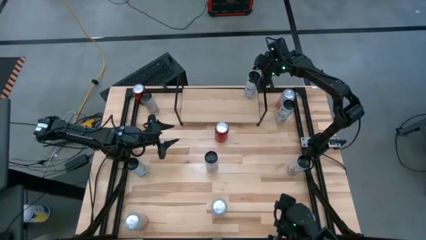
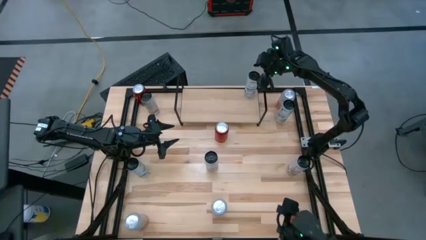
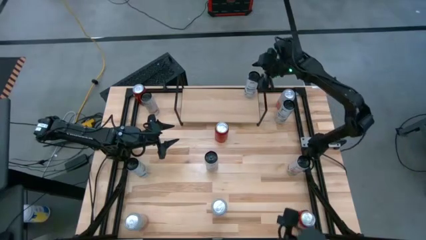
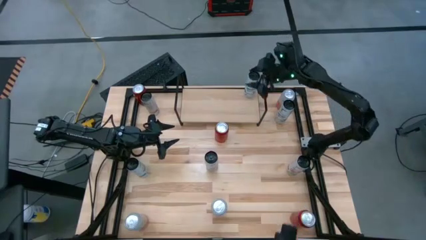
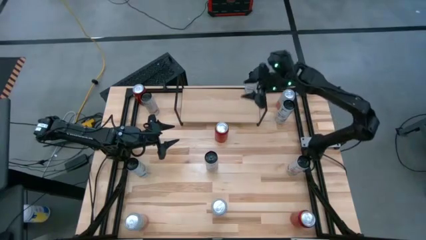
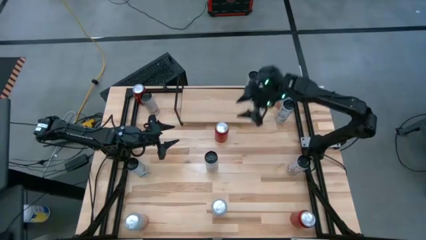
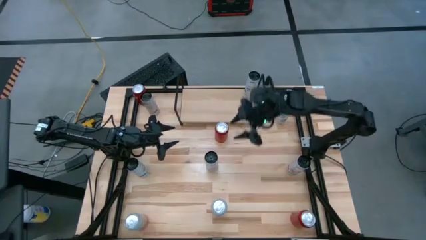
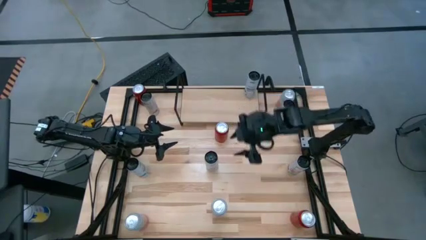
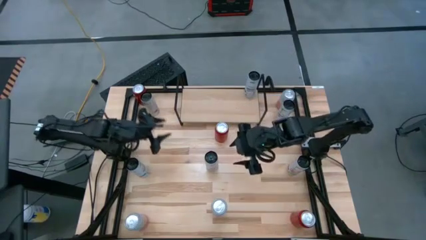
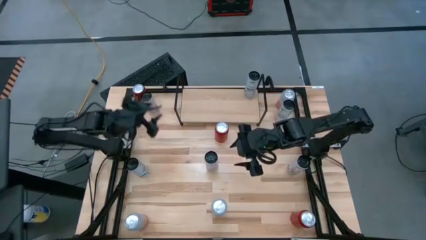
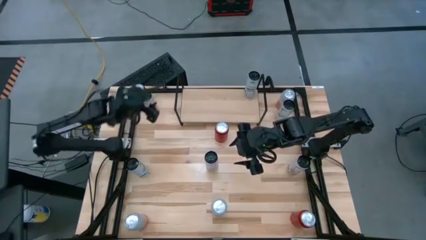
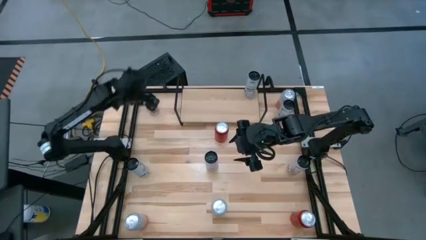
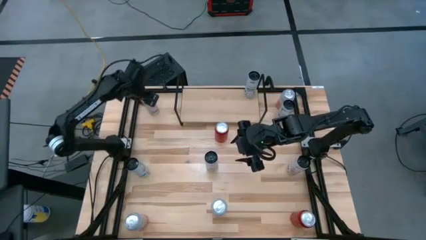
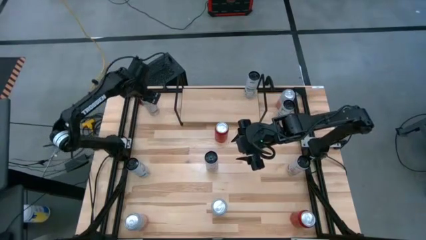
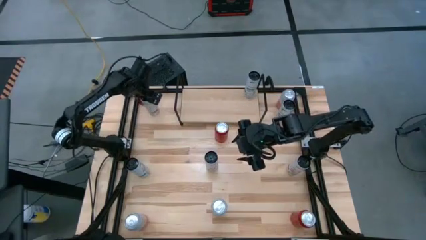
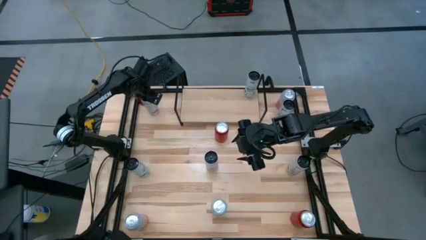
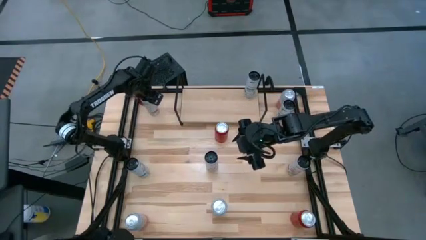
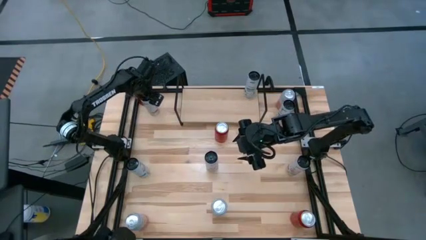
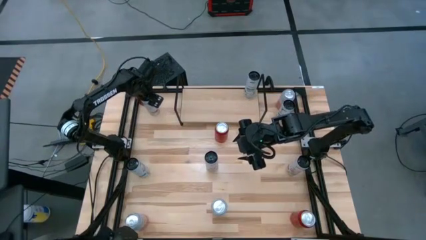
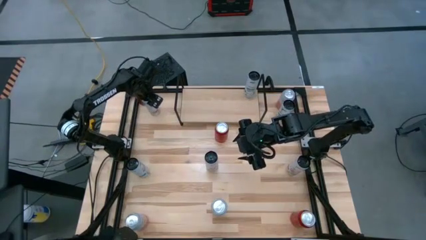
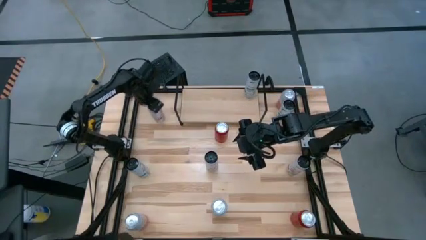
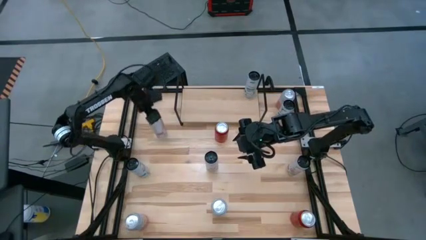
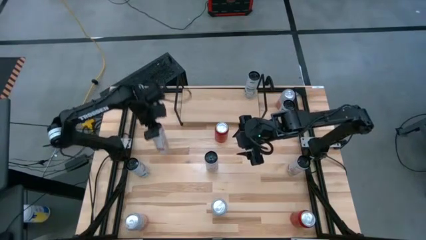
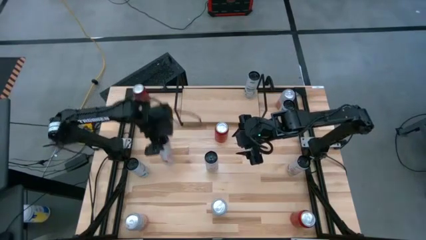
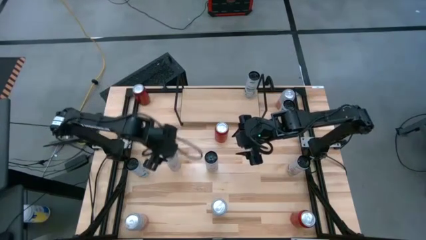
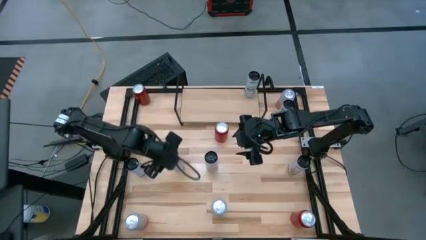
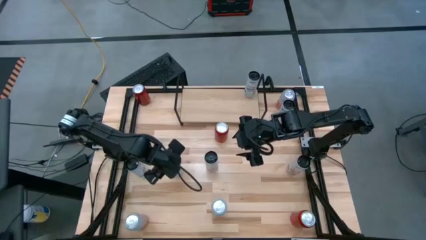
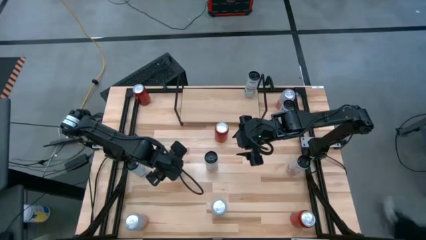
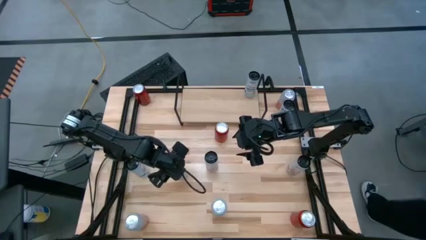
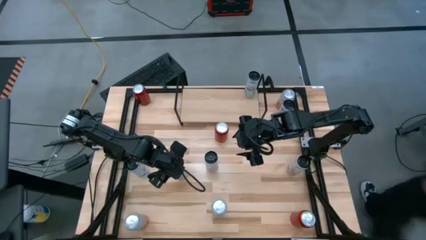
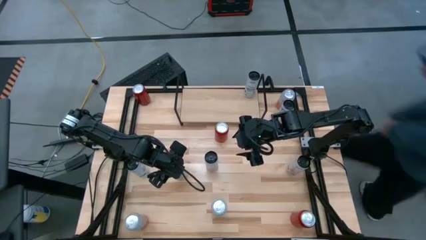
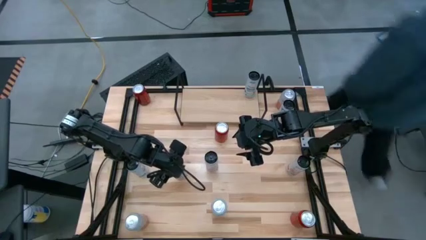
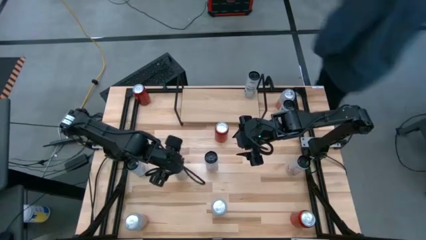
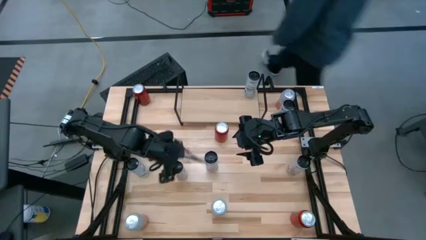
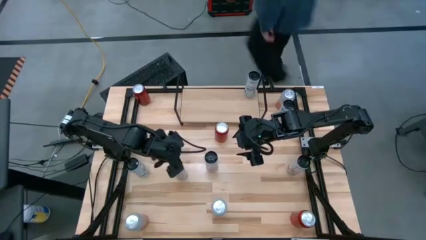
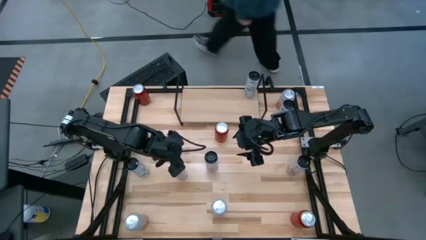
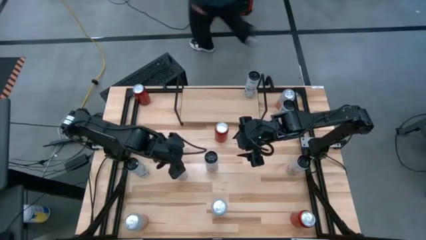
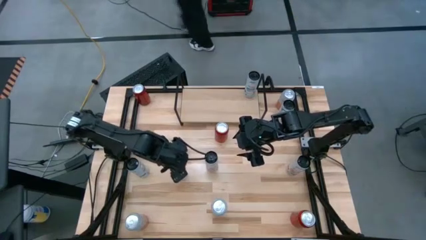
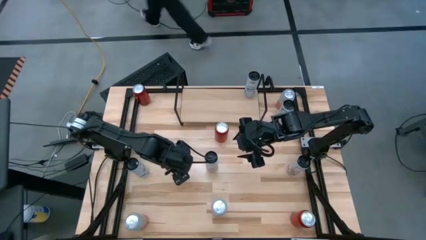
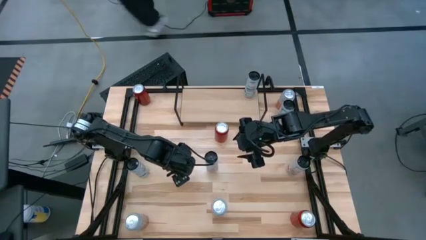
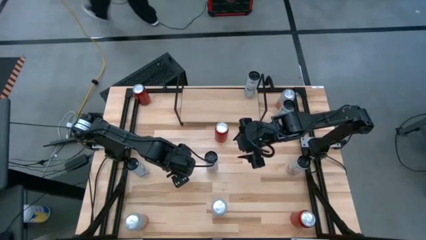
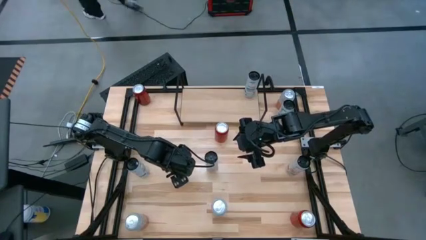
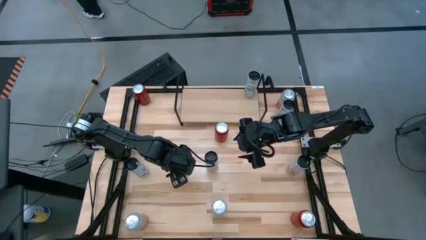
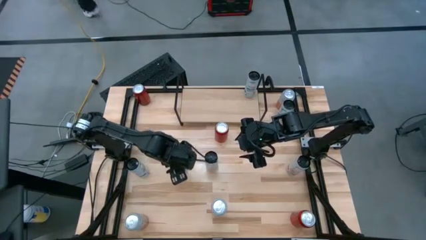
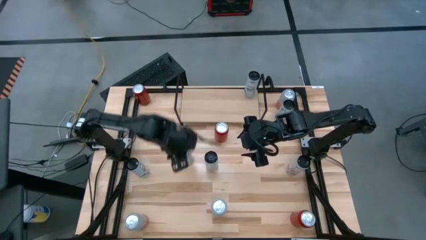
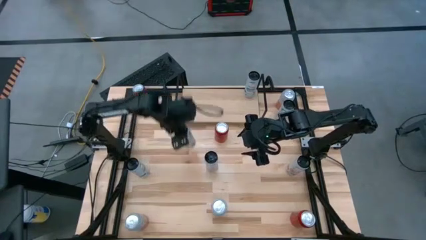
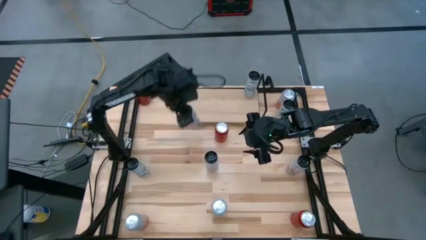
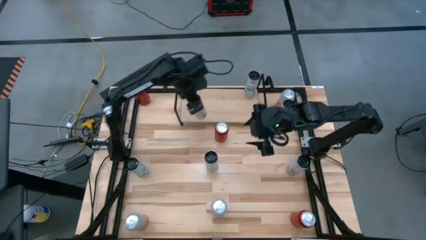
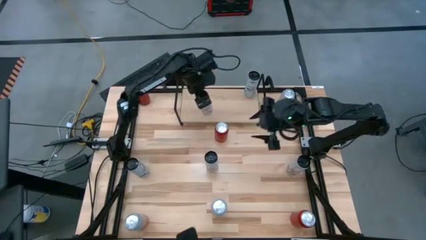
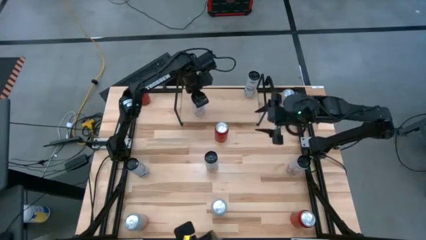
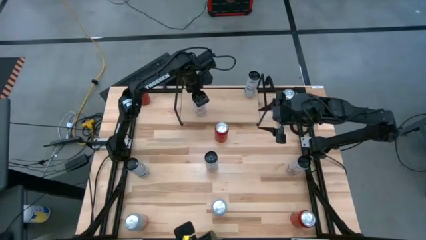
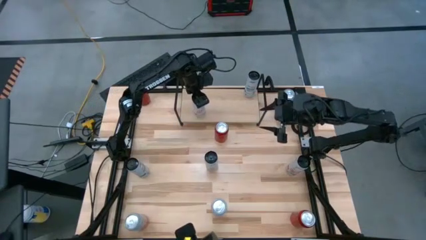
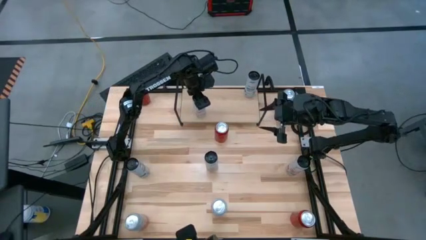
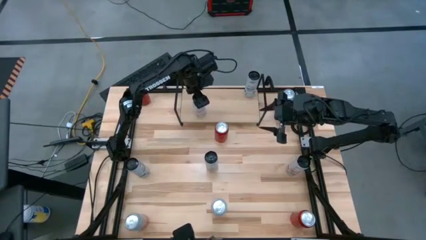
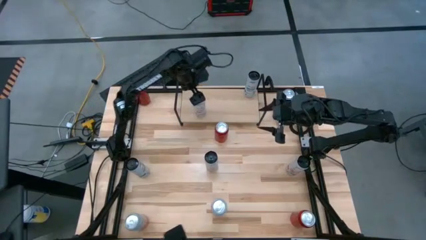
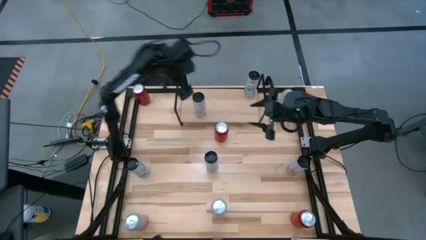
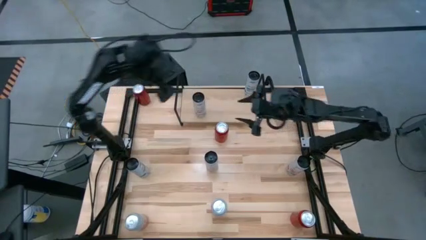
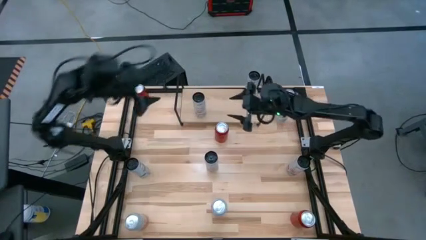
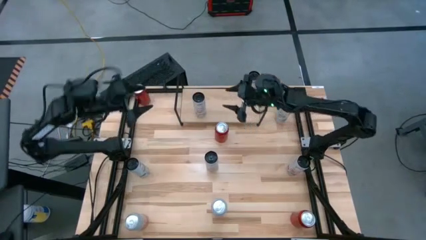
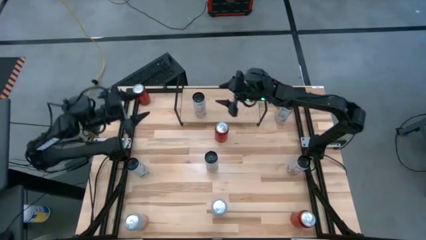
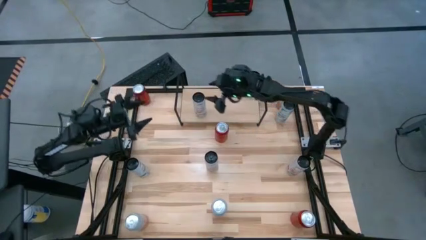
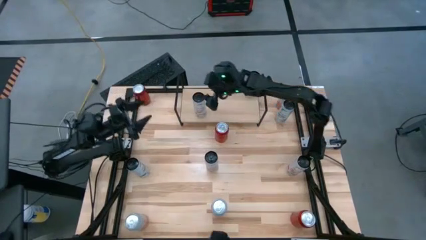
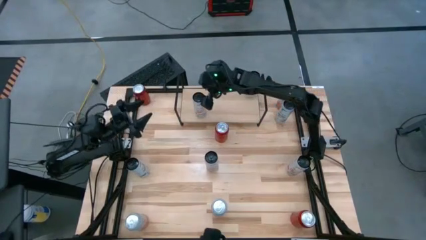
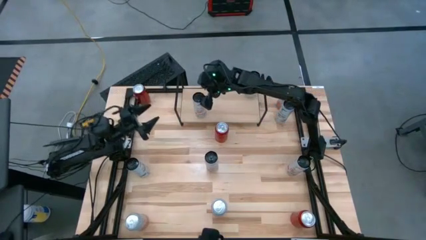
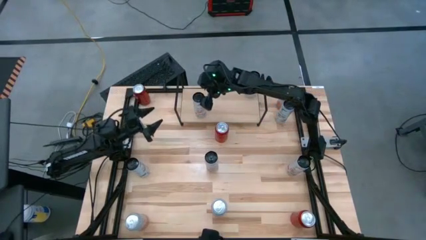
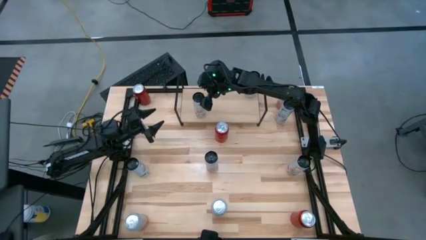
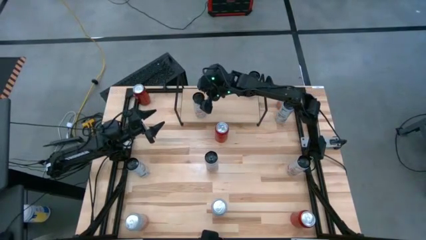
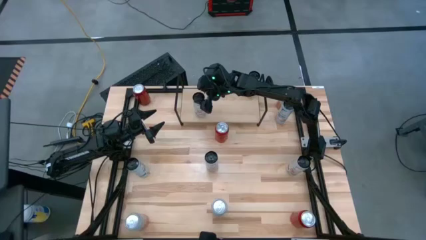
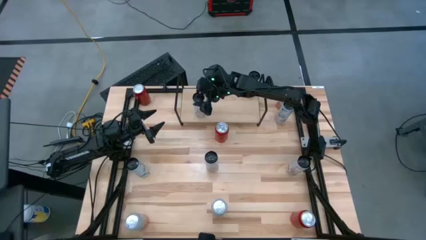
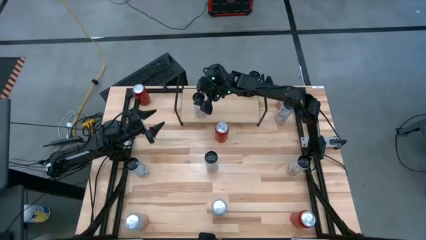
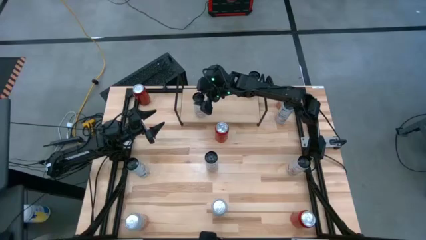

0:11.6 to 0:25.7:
Task: Place canned beverage on shelf
Put the top left white pink soda can on the shelf

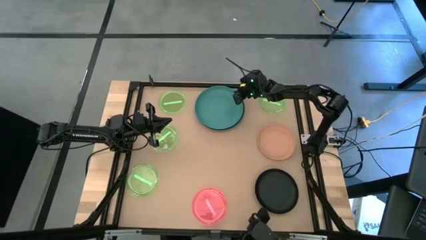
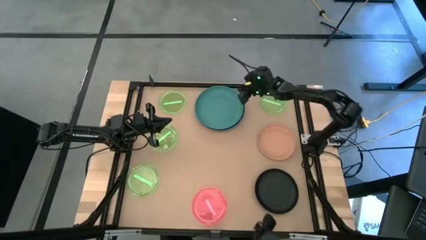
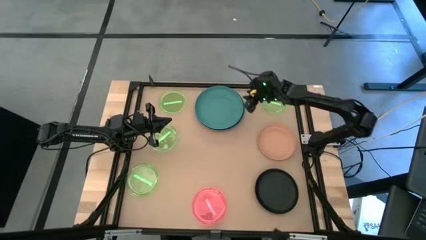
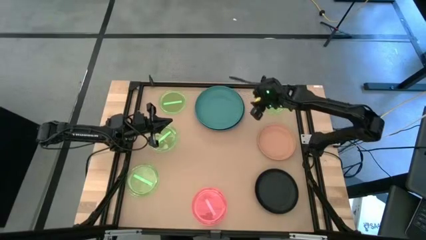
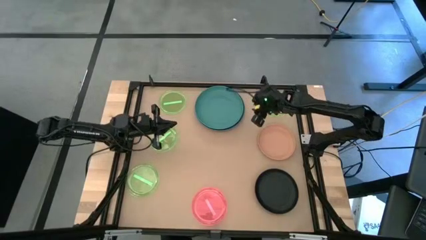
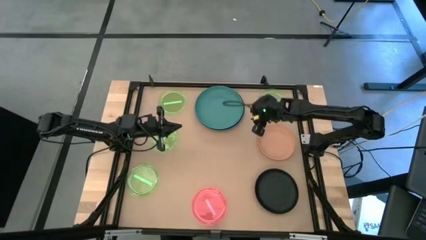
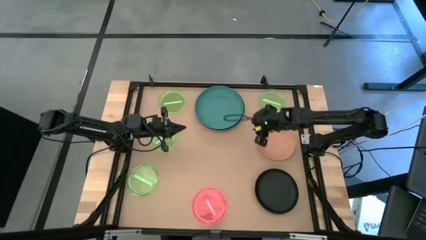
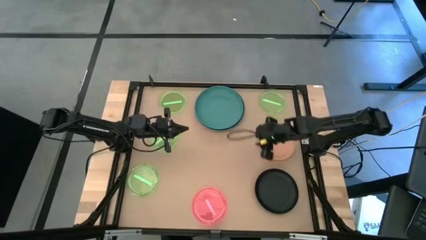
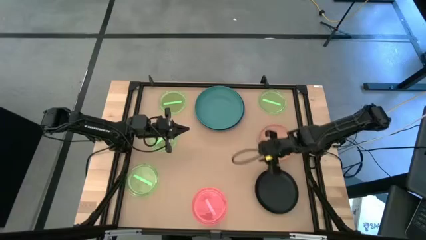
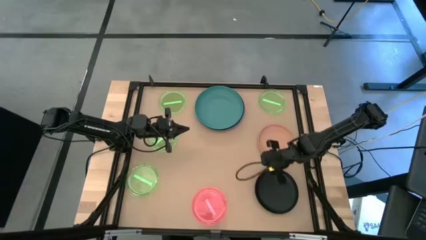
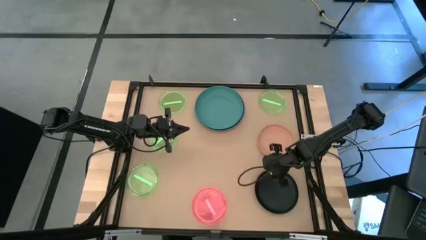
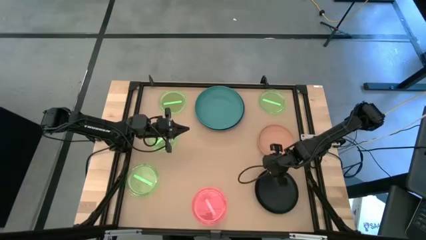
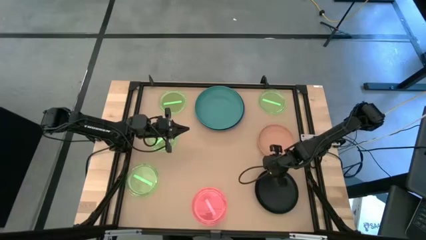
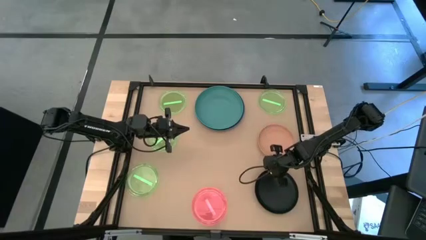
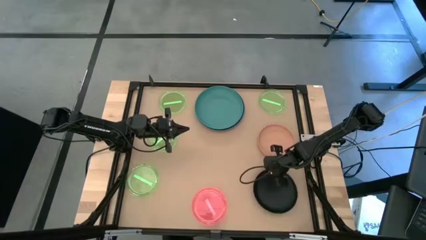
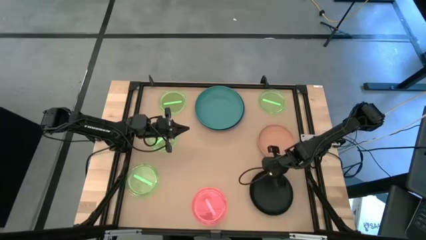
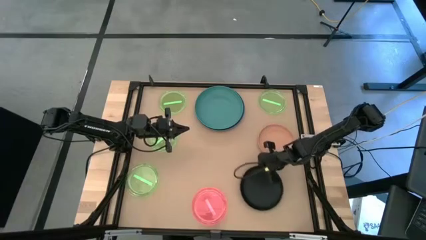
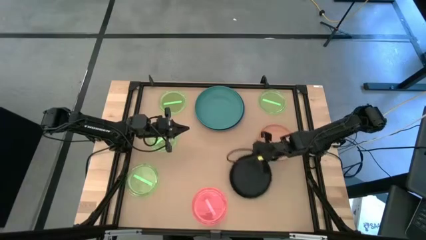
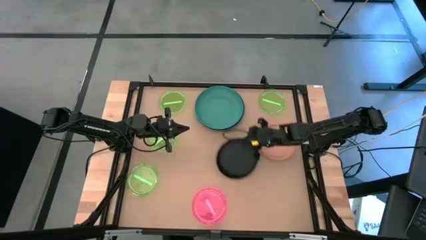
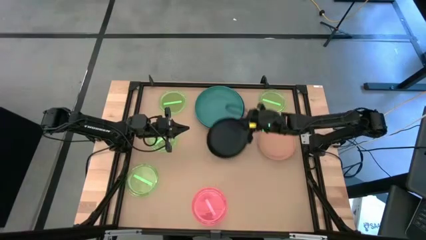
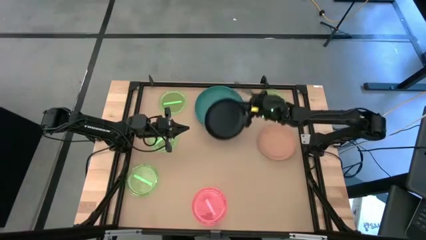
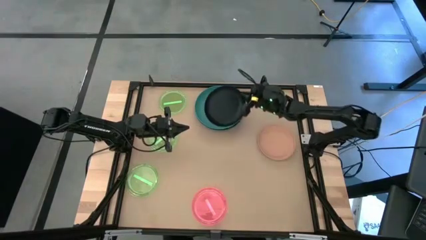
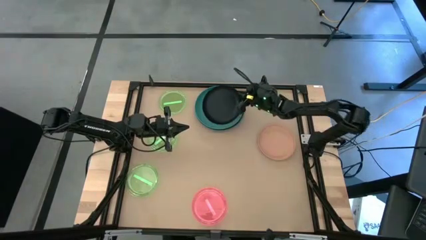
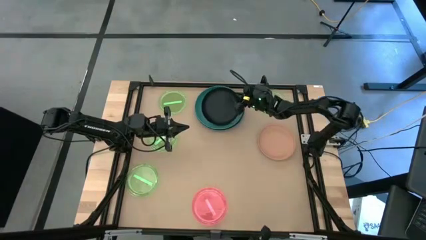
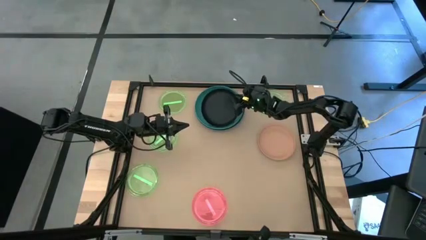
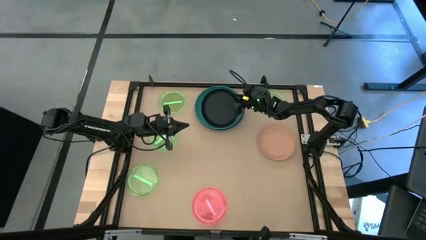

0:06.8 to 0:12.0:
Task: Stack plastic plates
Stack the black plate on top of the green plate
